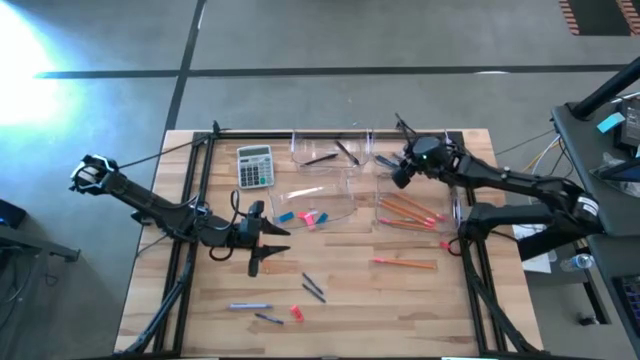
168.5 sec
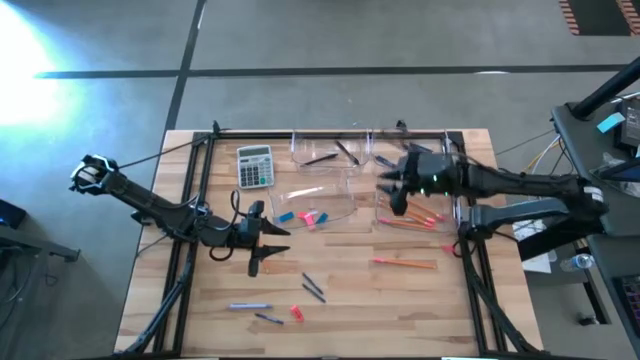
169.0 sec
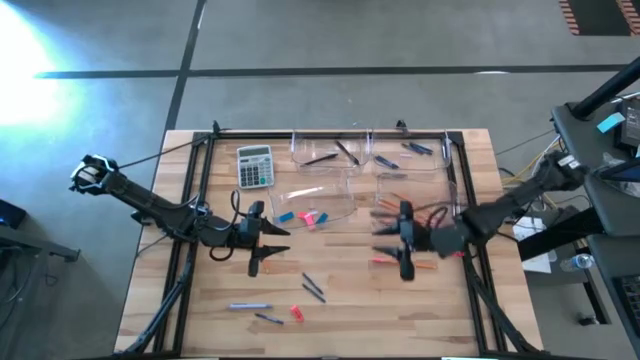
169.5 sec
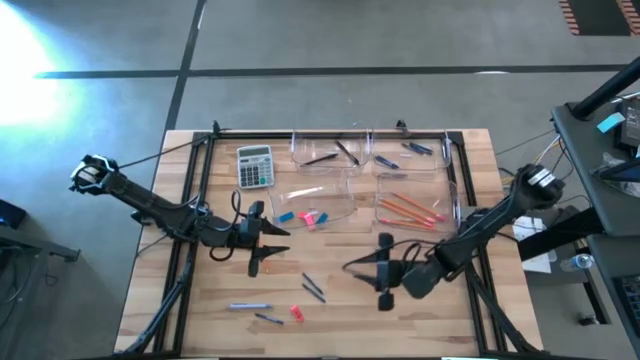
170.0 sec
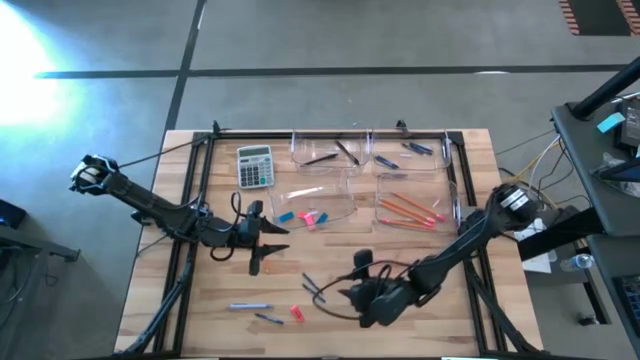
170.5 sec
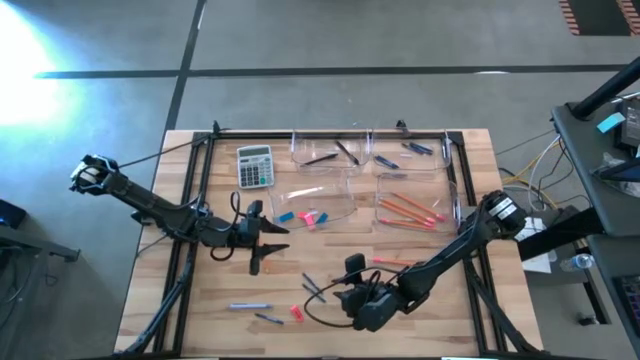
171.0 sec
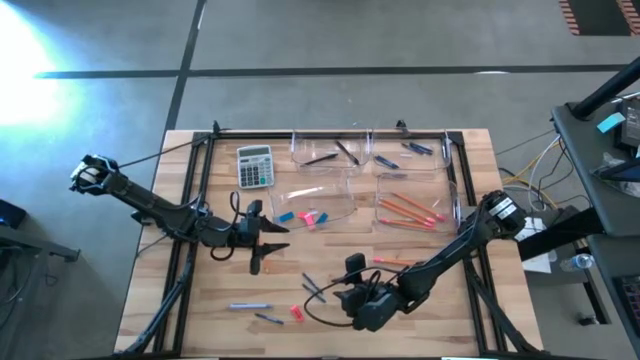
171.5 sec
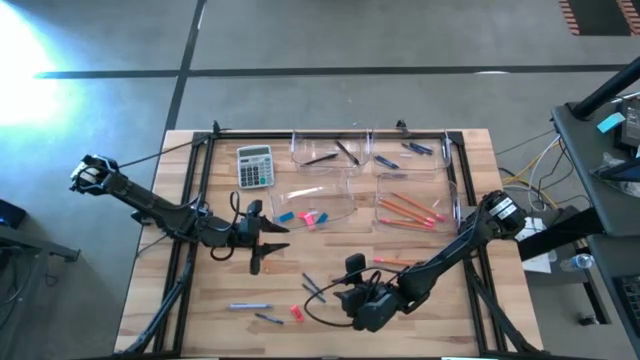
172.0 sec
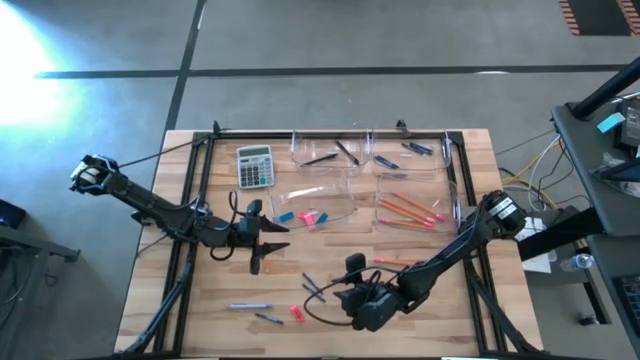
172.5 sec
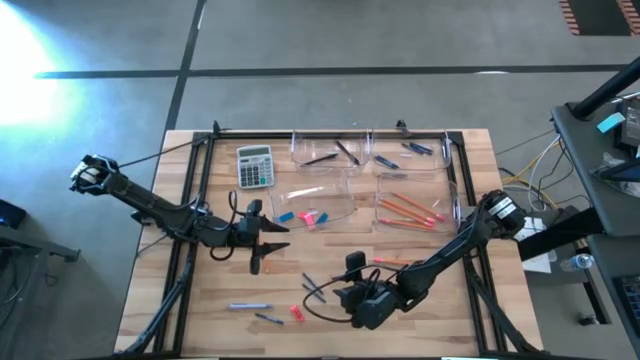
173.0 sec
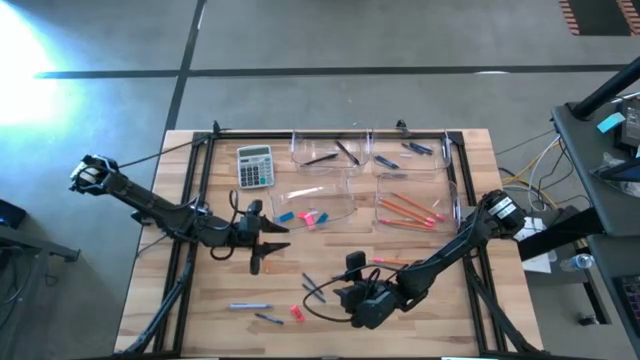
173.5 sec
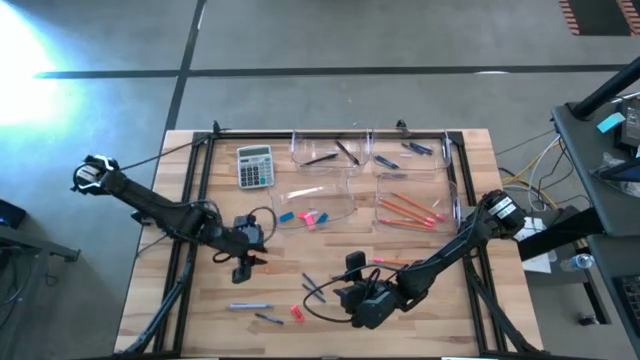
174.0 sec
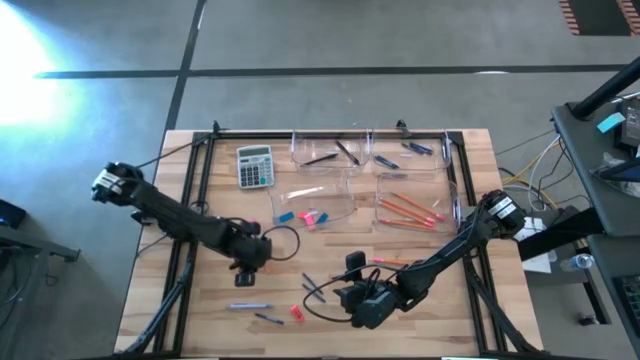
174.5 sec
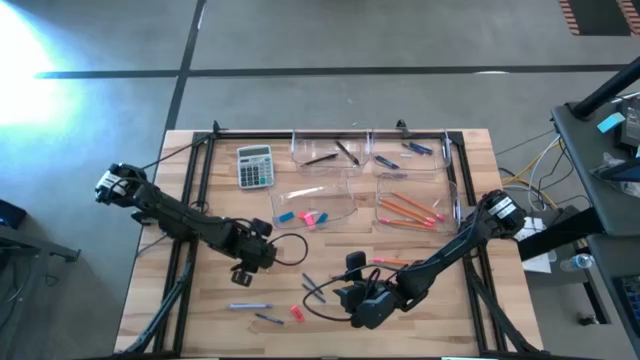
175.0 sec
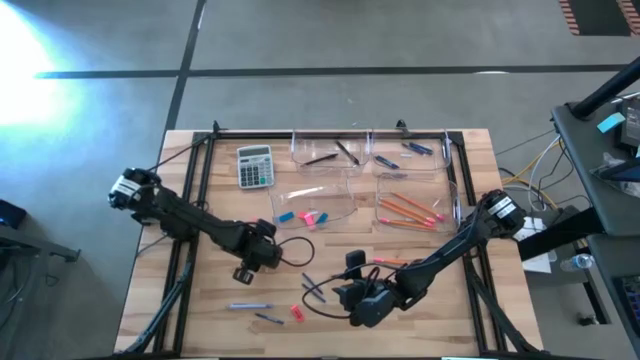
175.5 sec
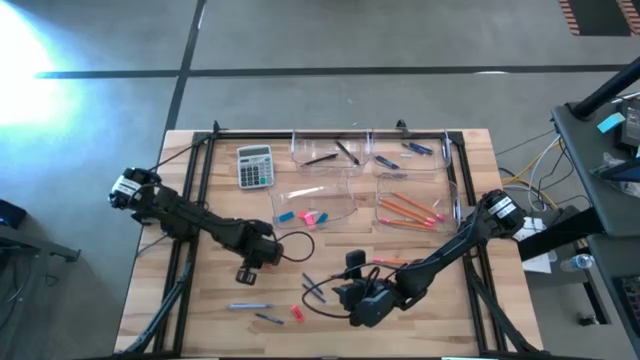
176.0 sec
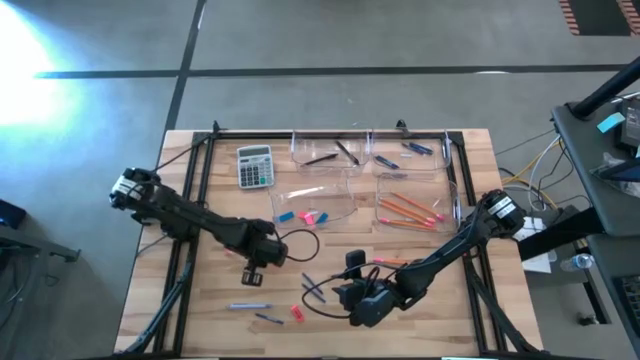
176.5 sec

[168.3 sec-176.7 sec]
Task: Sort crayons/erasers/pens/pencils in bins
Put the orange pencil into the bottom right transparent bin

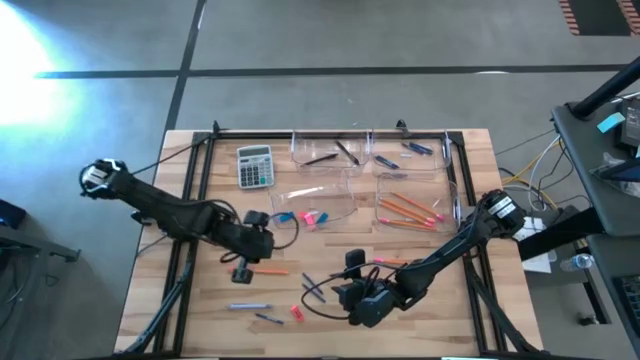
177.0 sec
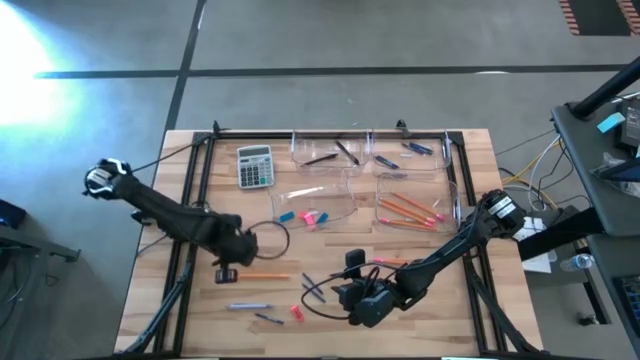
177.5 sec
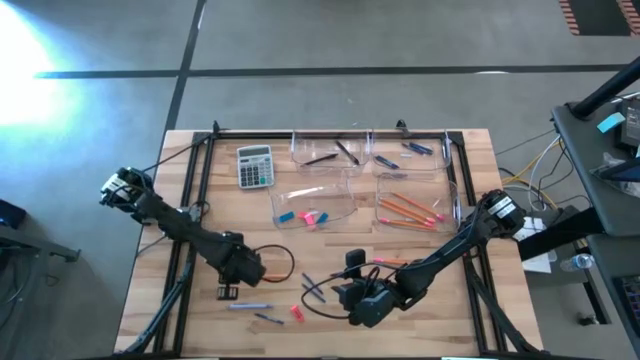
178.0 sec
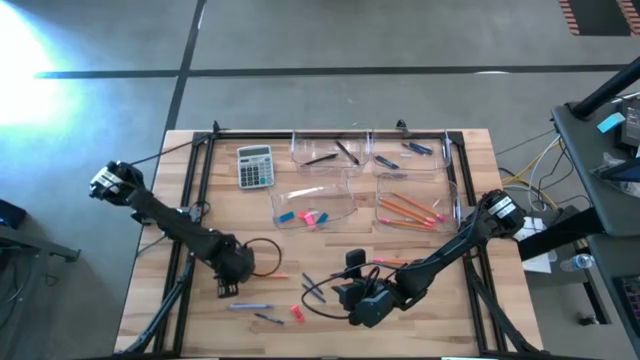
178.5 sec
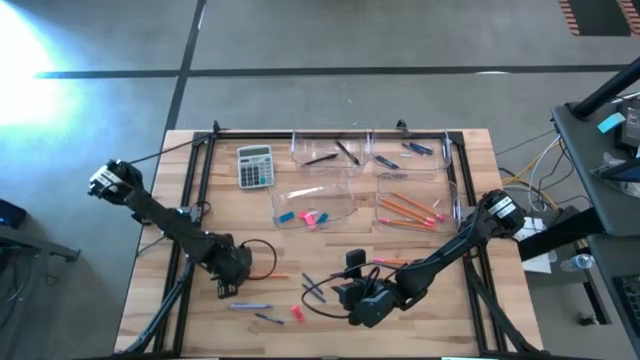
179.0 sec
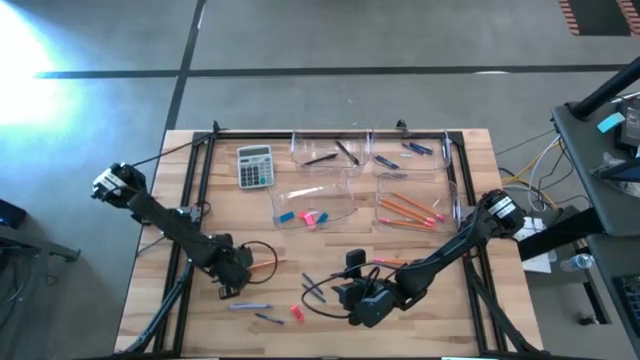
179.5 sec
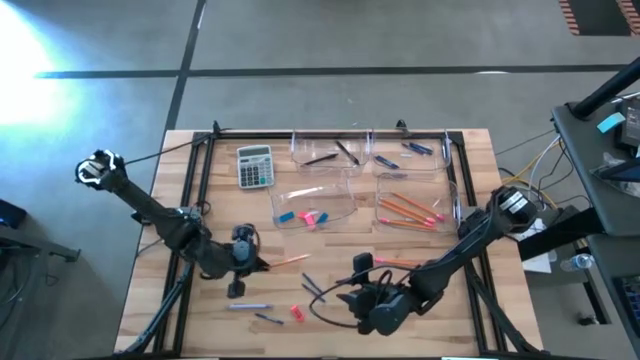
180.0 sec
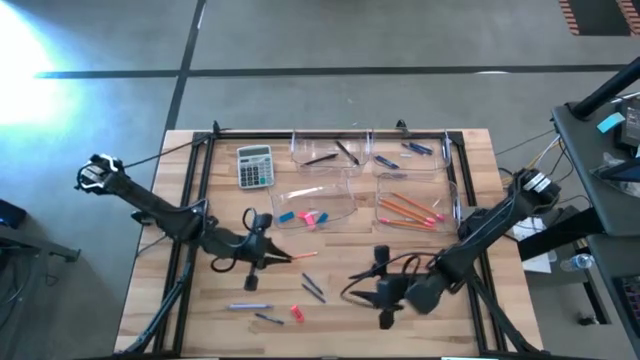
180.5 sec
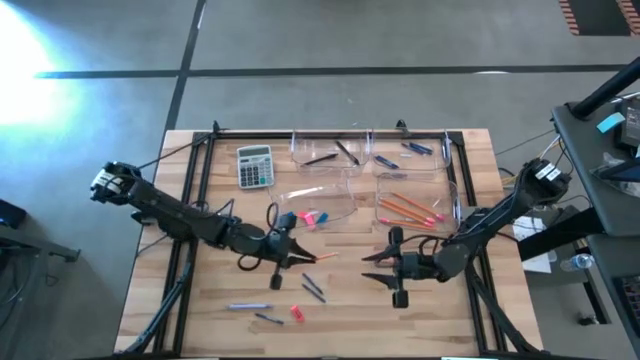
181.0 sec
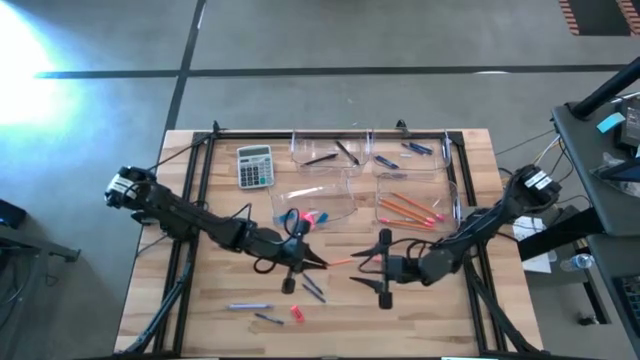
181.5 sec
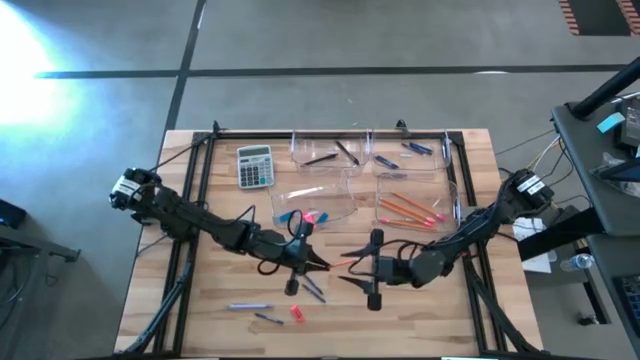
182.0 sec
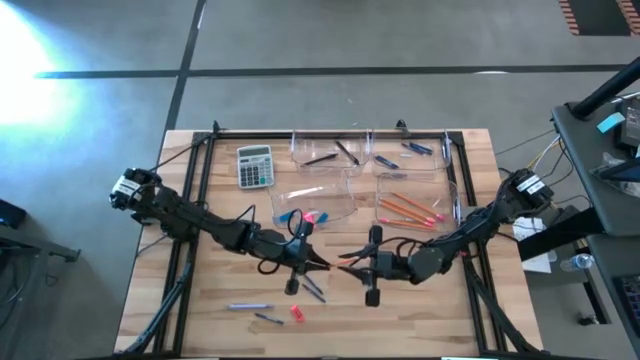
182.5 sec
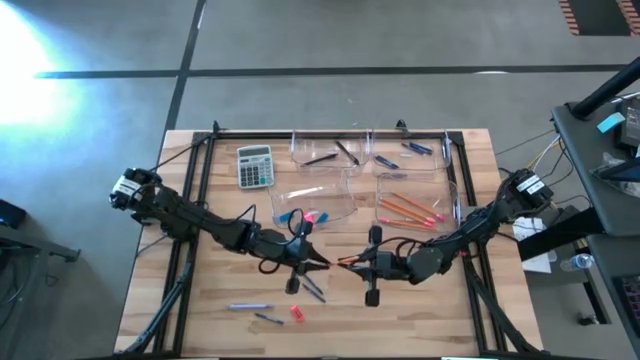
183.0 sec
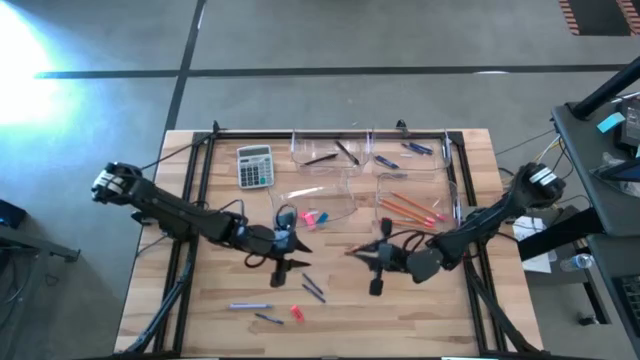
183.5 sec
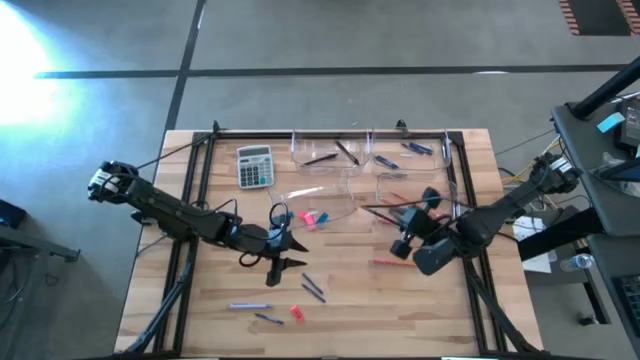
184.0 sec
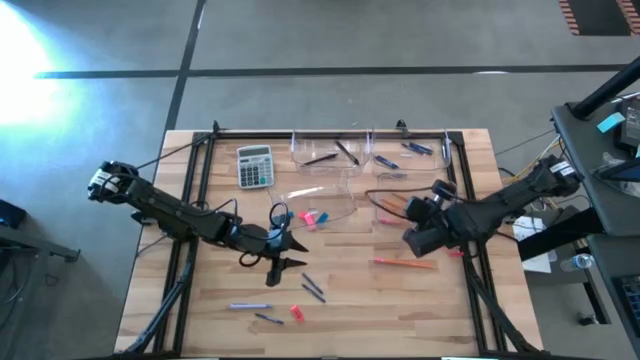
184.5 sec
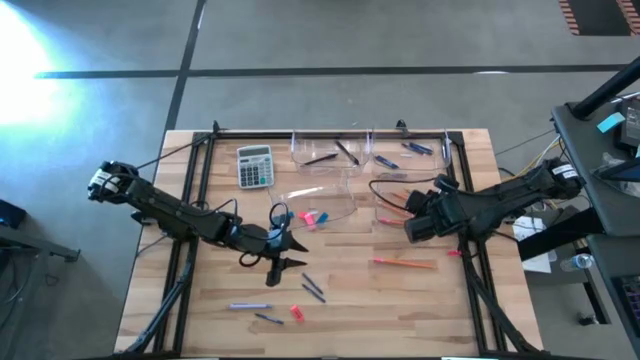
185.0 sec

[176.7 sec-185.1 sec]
Put the orange pencil into the bottom right transparent bin

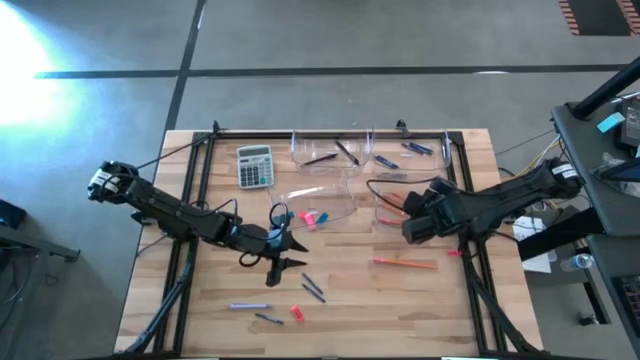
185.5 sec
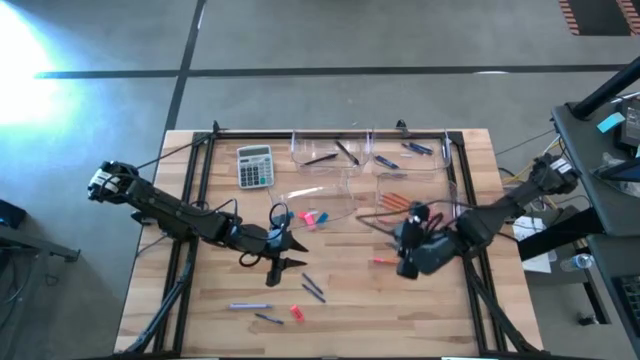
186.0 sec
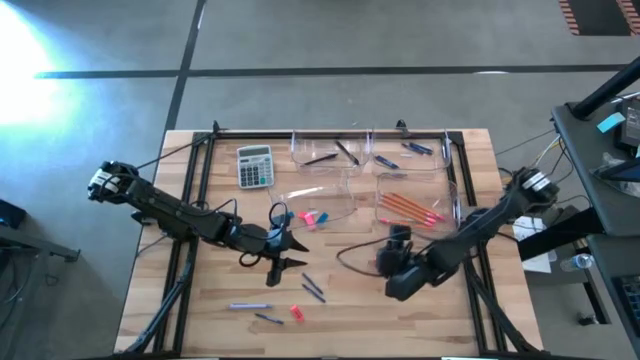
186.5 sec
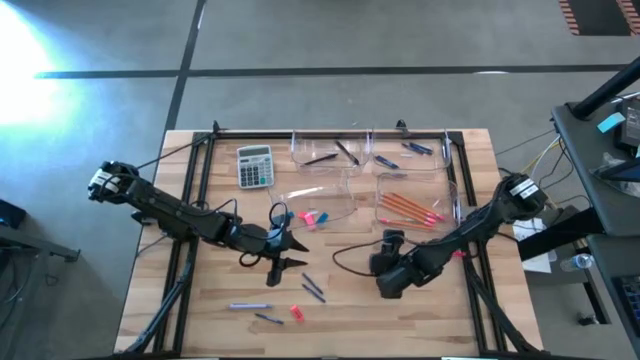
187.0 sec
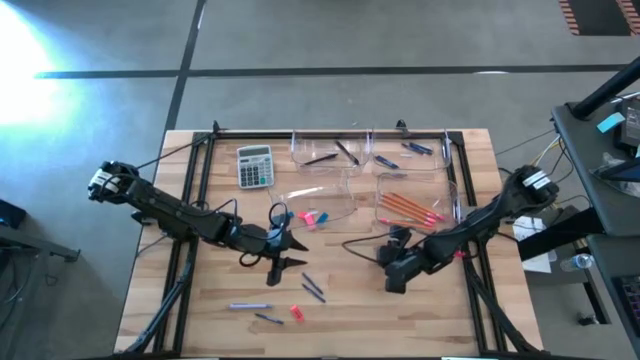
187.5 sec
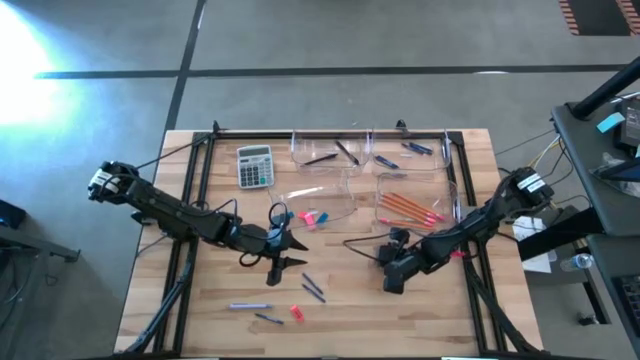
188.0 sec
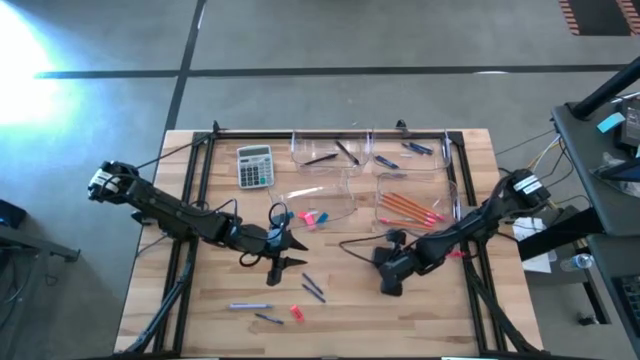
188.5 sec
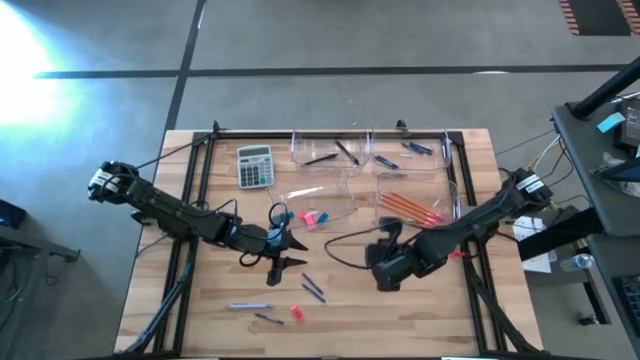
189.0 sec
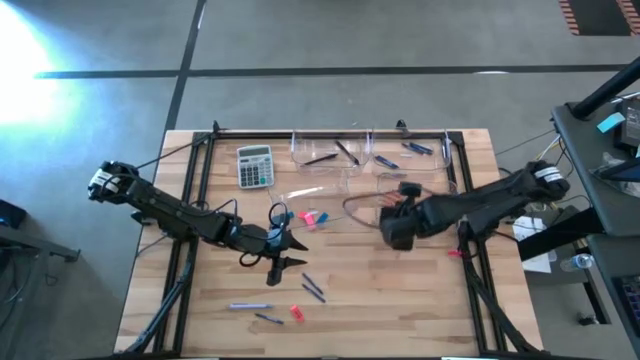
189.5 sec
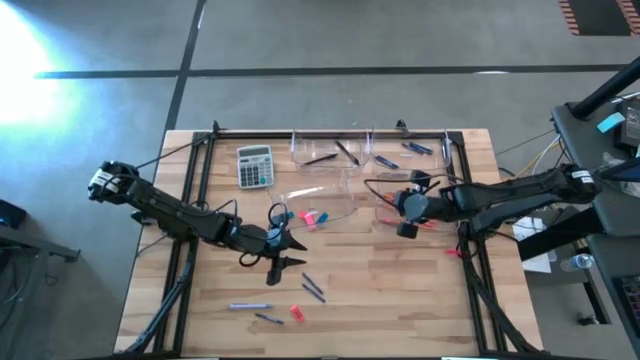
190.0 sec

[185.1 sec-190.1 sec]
Put the orange pencil into the bottom right transparent bin
